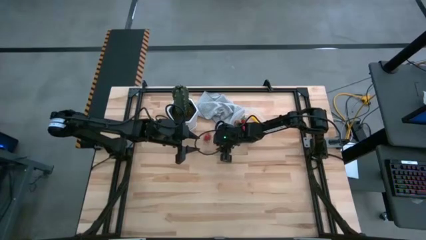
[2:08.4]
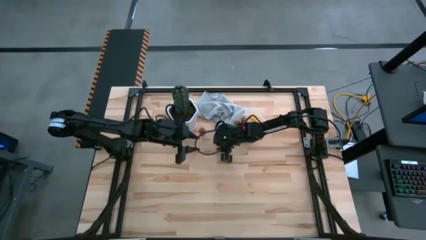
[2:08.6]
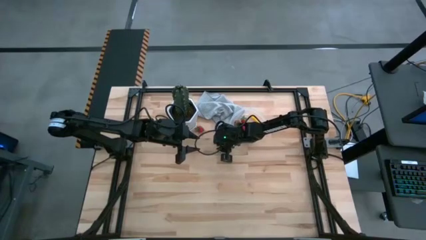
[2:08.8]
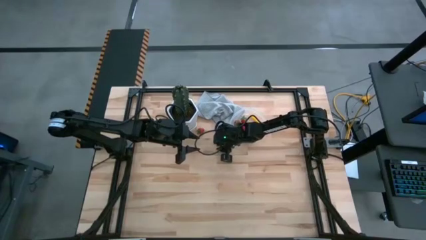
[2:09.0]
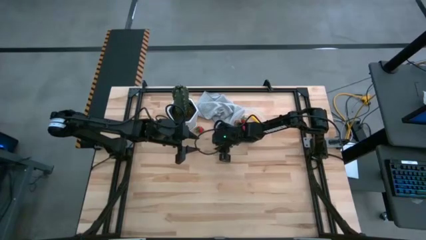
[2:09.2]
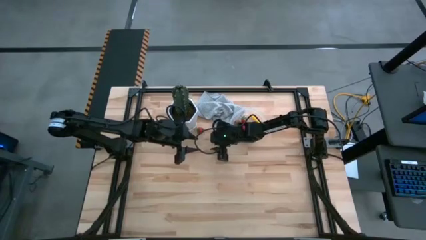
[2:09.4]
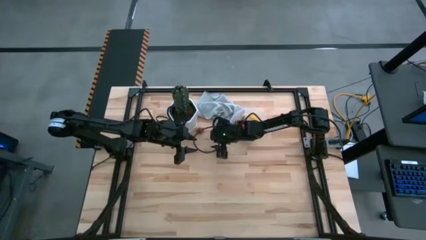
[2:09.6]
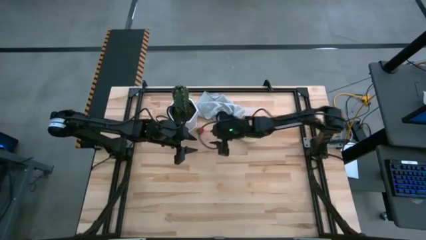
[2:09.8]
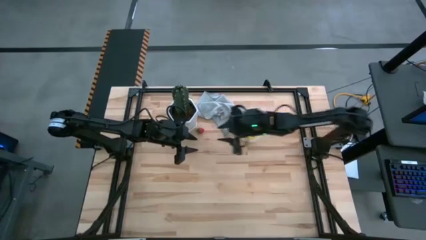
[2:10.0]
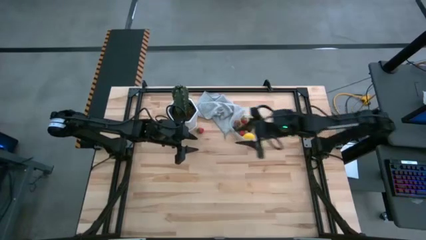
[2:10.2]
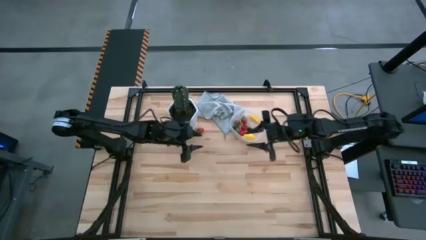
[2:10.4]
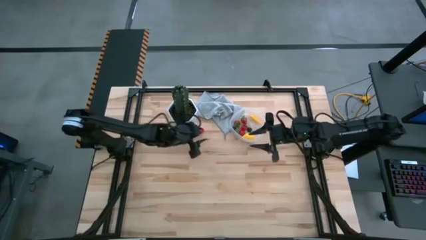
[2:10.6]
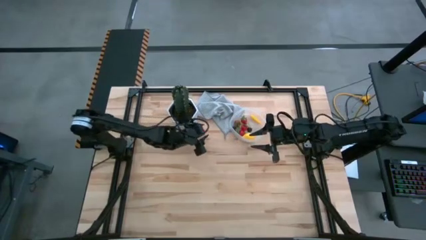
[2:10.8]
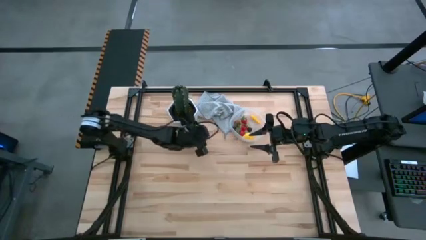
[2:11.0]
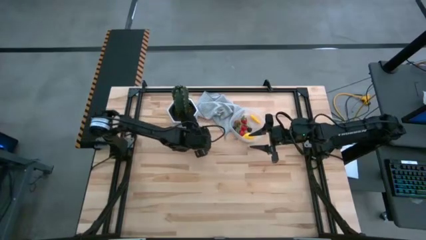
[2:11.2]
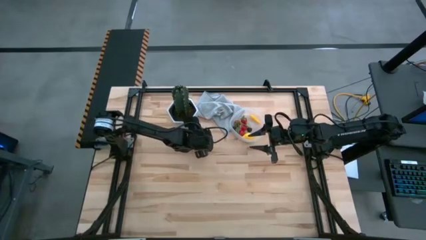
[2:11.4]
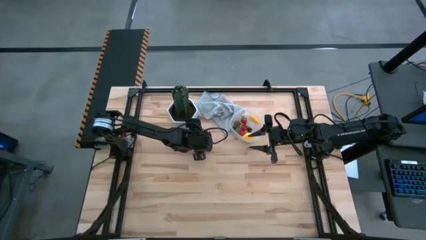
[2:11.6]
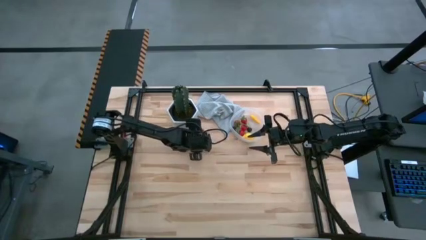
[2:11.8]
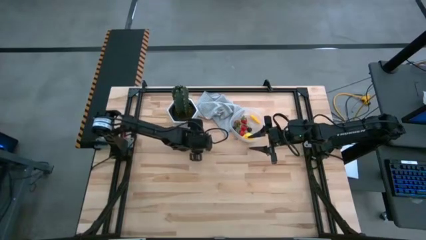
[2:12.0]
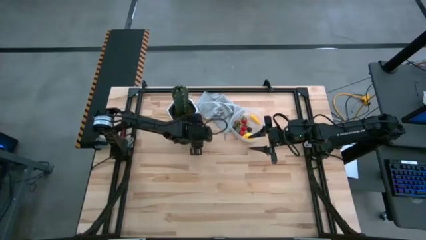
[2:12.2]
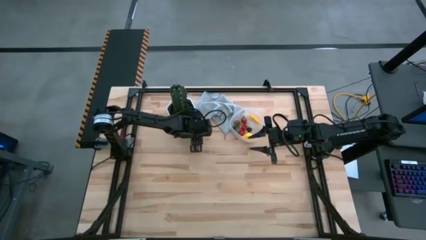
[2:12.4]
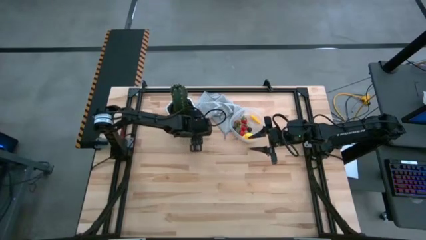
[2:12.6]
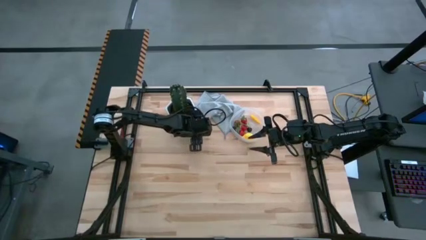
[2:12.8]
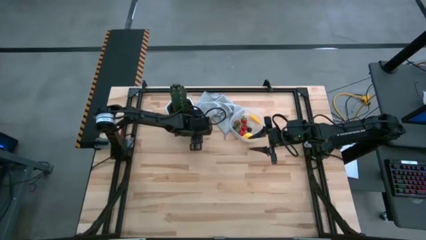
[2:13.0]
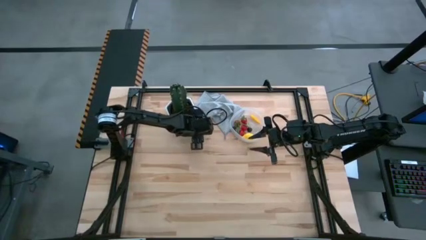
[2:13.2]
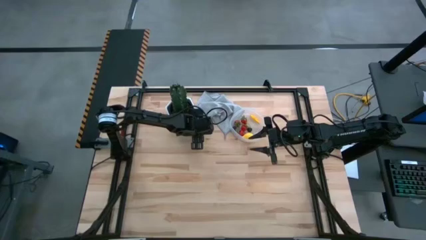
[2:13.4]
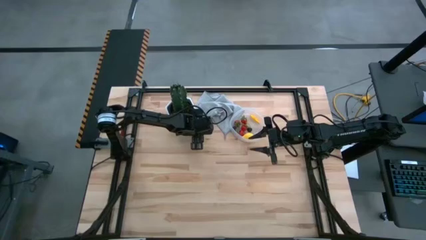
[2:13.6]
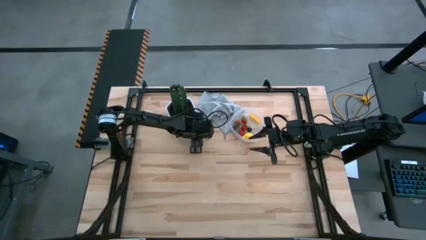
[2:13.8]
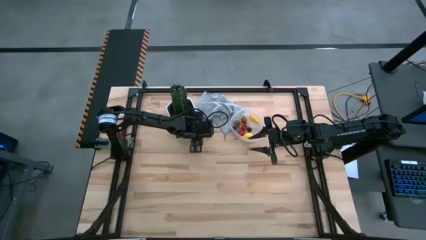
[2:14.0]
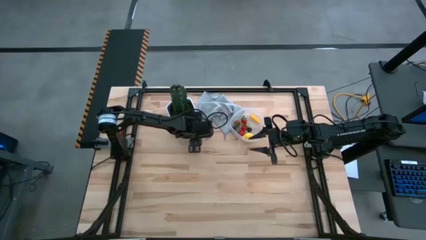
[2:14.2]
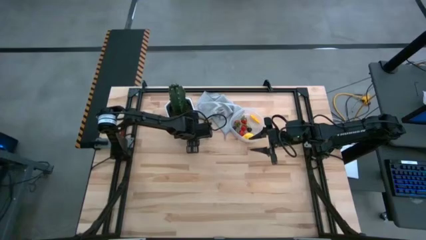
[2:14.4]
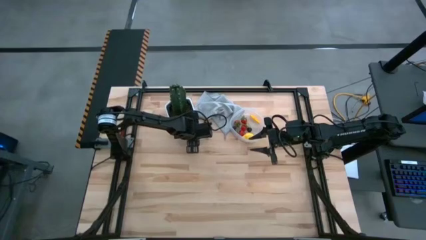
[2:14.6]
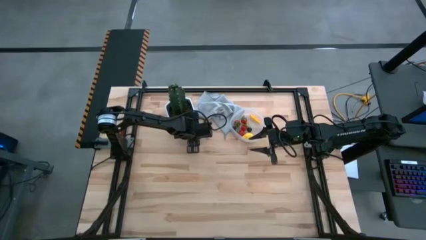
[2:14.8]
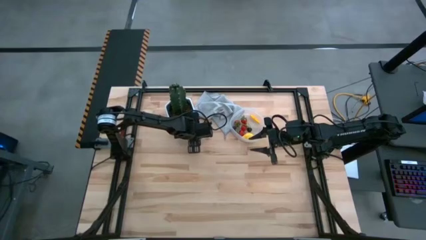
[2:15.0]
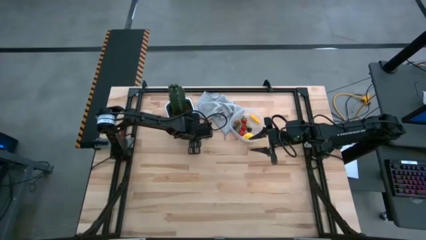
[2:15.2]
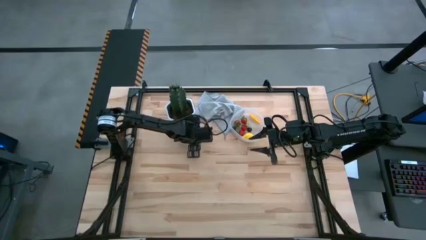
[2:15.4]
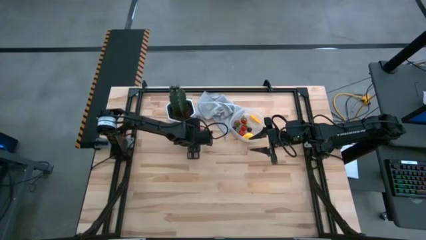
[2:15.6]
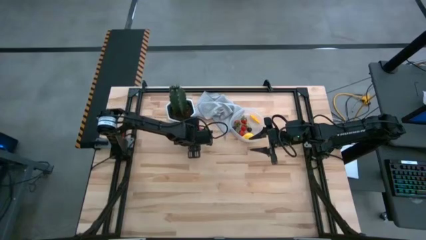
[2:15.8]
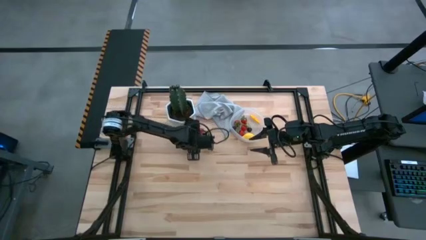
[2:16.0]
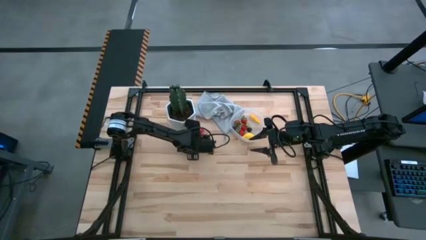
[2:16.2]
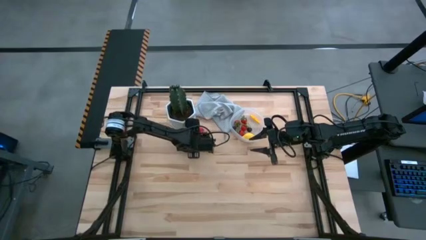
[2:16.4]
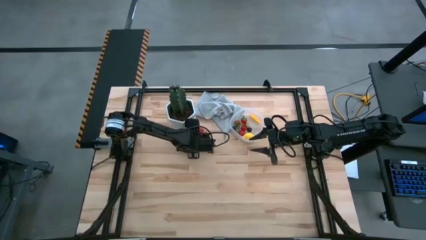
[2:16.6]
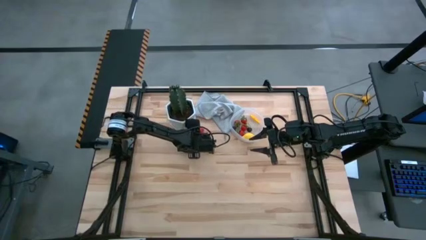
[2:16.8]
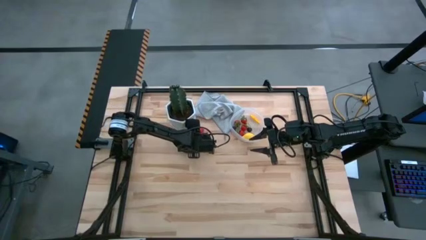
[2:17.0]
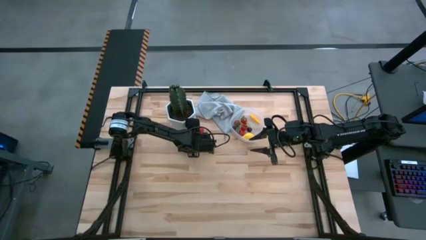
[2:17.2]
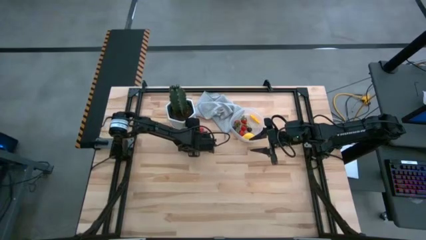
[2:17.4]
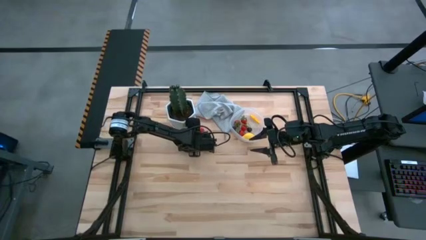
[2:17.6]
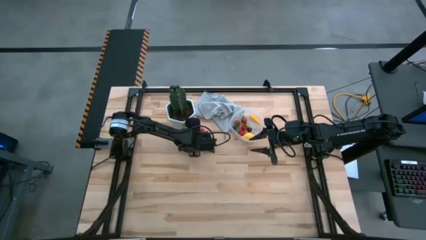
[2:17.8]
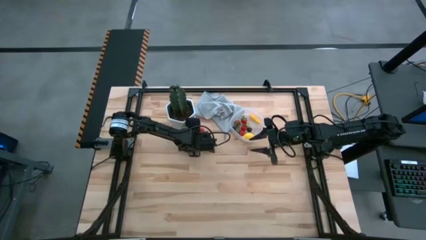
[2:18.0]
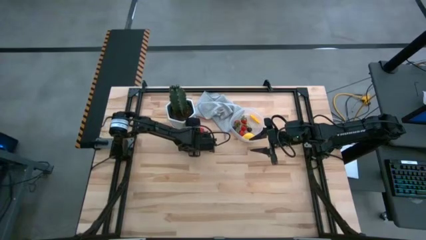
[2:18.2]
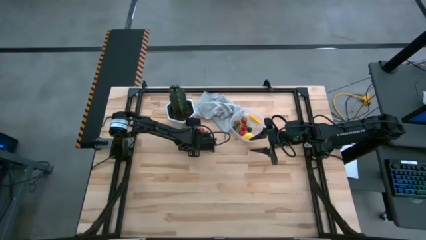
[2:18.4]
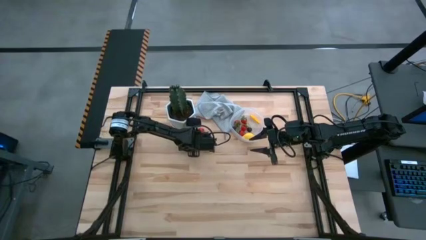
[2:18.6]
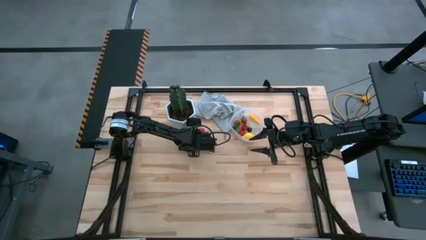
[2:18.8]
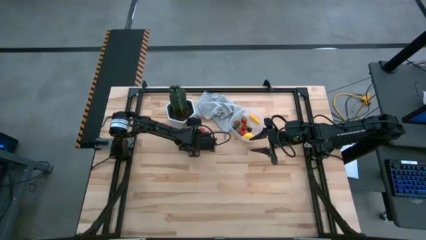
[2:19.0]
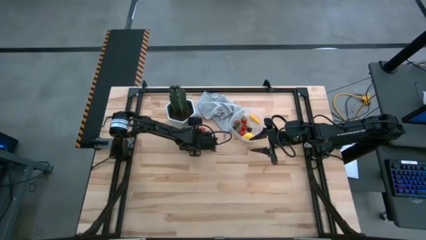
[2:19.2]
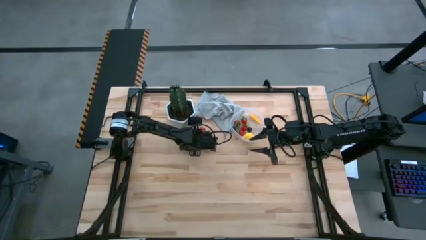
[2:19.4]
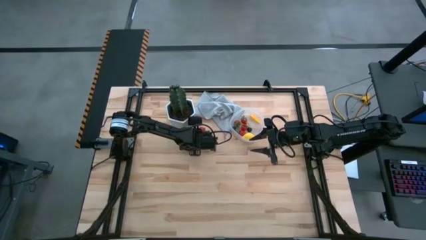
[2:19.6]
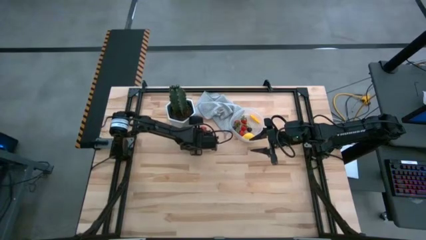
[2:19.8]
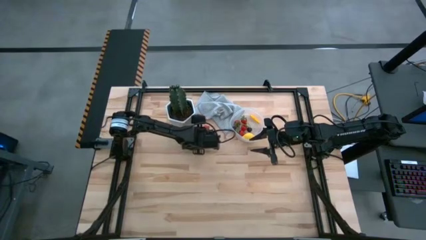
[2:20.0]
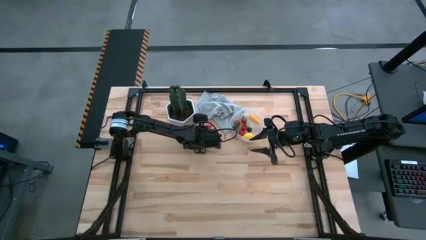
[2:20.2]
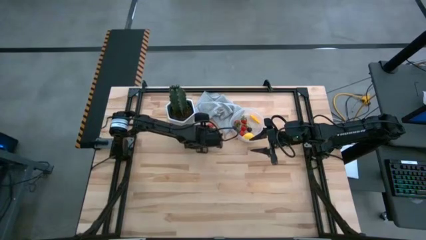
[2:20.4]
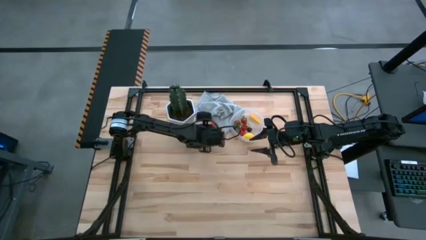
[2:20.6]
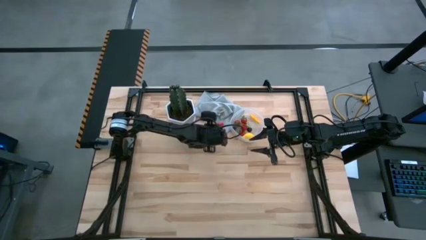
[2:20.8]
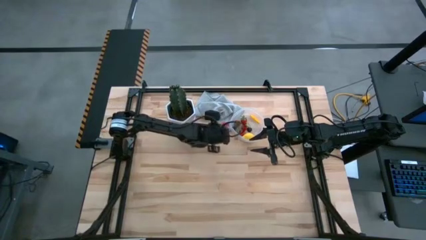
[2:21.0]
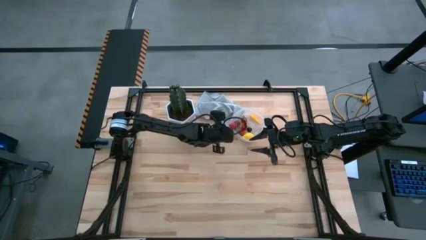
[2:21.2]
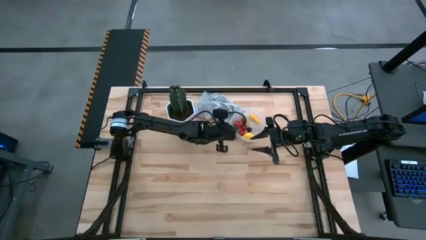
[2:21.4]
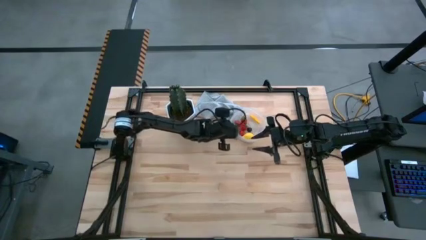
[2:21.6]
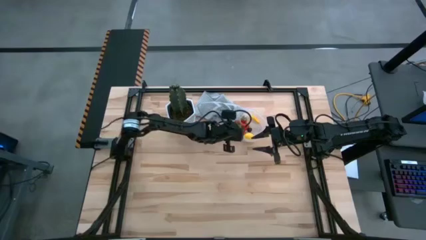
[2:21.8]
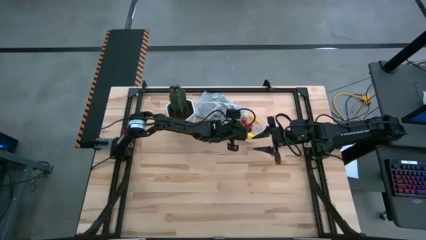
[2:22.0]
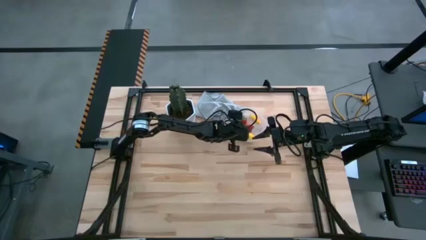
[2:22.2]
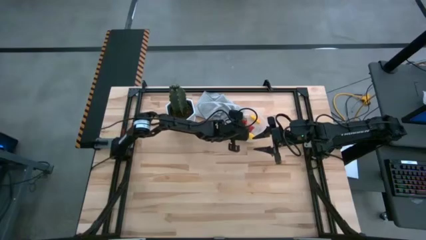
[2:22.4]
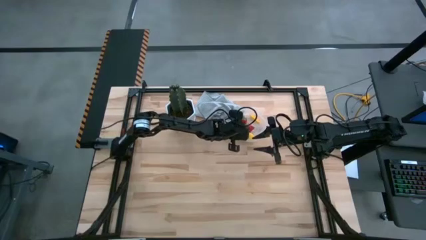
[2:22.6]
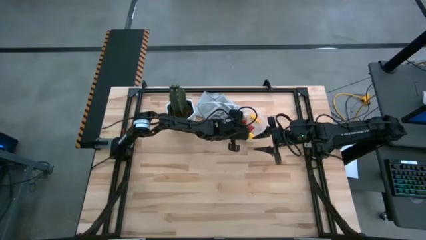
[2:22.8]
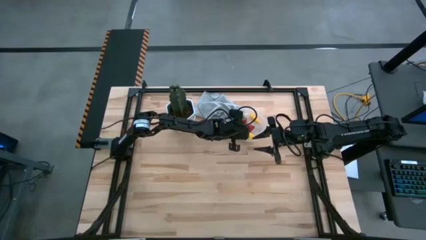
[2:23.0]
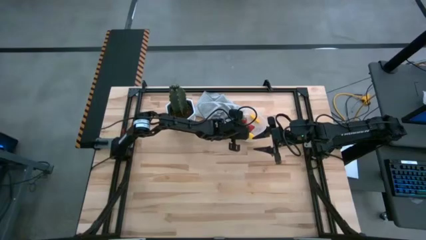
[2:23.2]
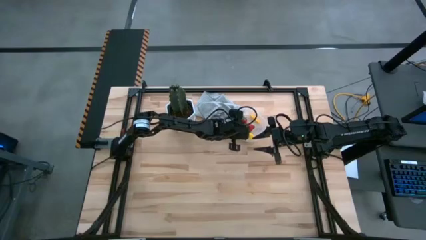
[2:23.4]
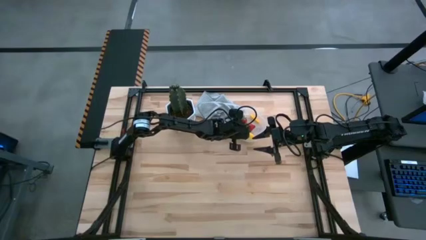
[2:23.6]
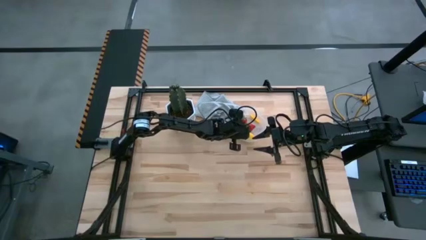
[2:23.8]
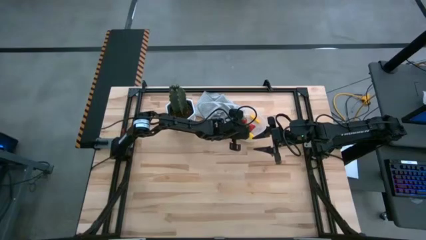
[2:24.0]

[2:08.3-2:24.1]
Task: Pick and placing Produce into tupperware
Put the strawberry into the transparent bin

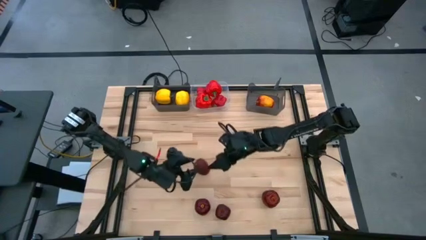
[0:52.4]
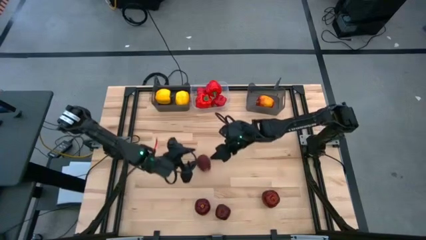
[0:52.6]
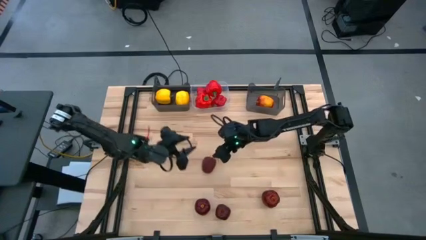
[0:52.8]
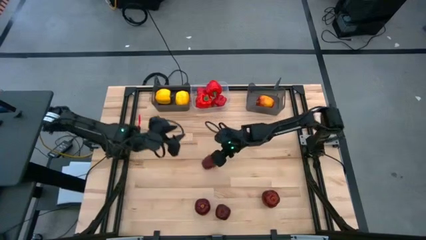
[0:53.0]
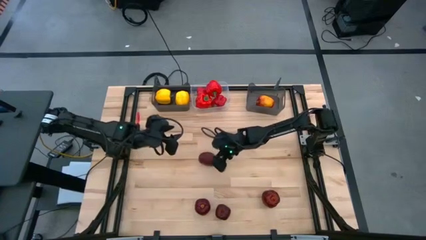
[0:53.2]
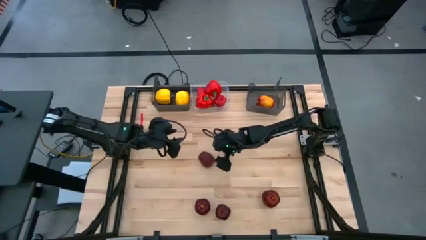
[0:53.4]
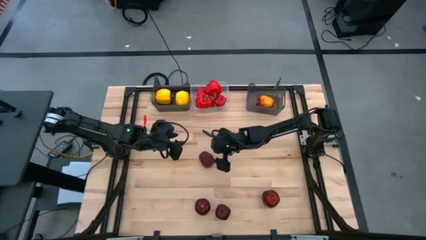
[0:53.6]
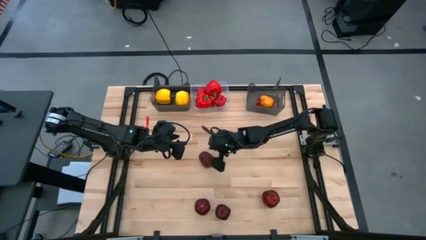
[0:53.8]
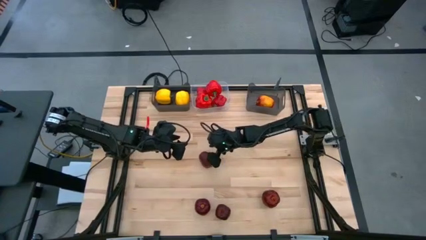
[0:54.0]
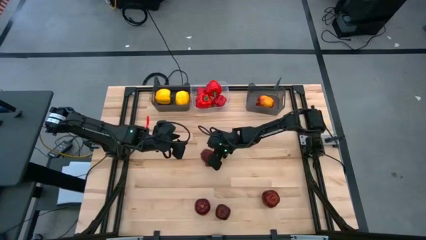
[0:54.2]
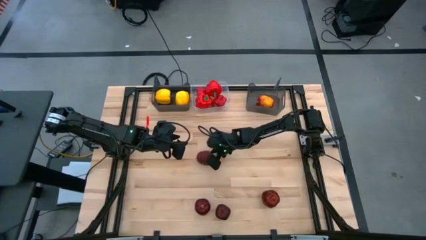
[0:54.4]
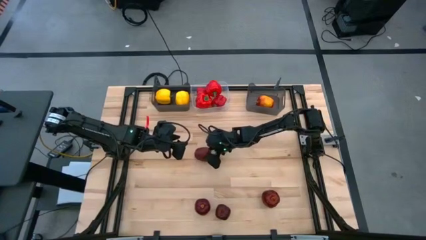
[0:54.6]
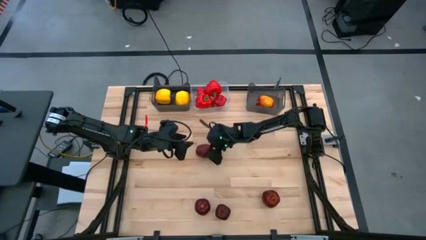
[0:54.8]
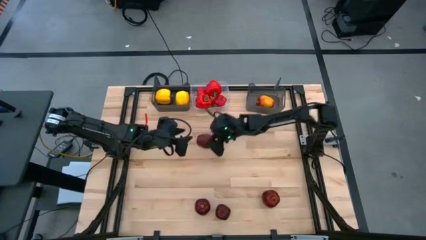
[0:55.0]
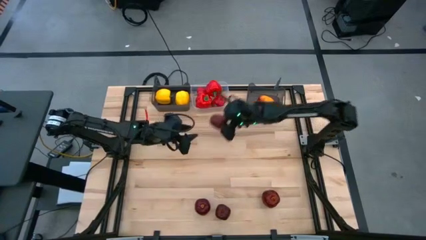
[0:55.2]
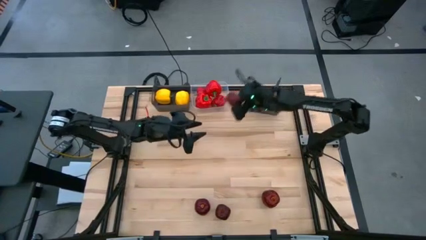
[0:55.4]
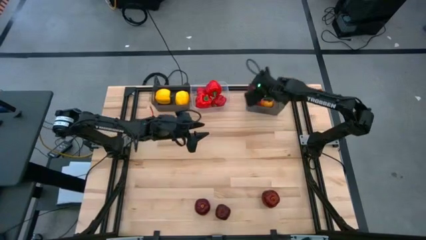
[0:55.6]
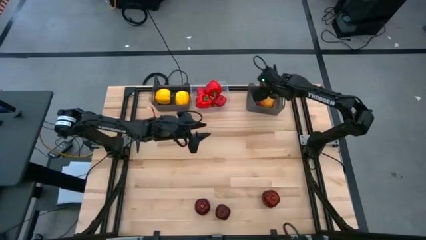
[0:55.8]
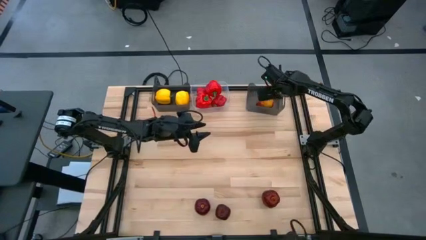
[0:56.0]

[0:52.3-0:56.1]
Task: Sort produce into baskets
Put the bottom left red apple into the right black transparent bin
